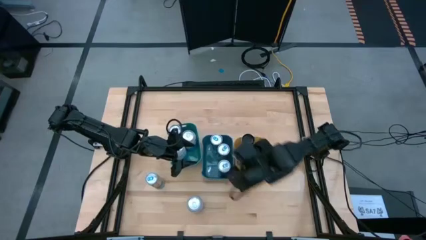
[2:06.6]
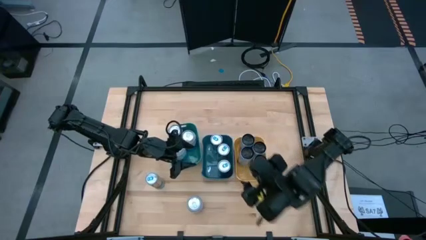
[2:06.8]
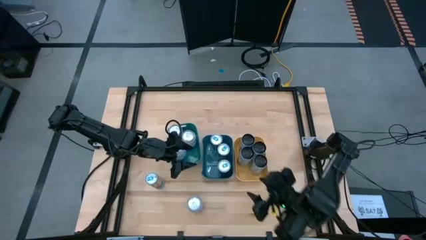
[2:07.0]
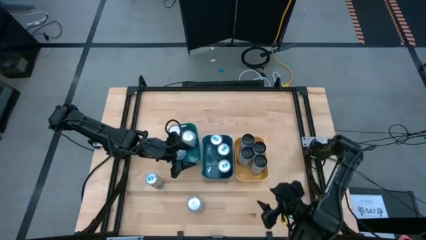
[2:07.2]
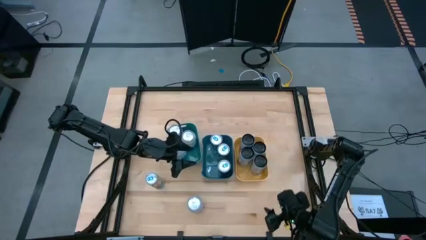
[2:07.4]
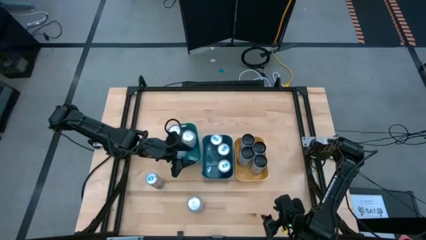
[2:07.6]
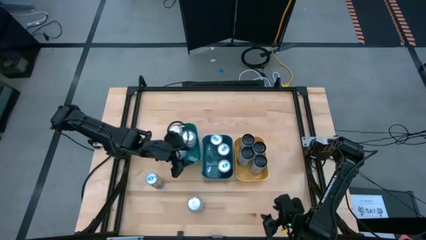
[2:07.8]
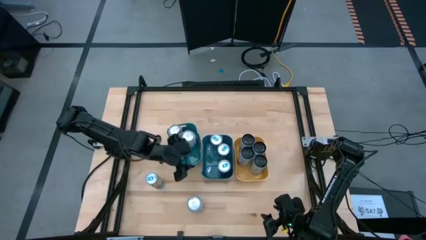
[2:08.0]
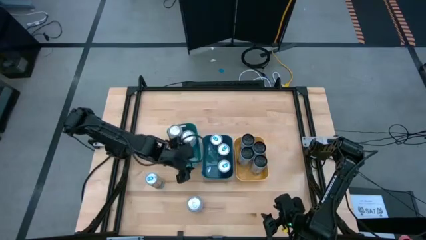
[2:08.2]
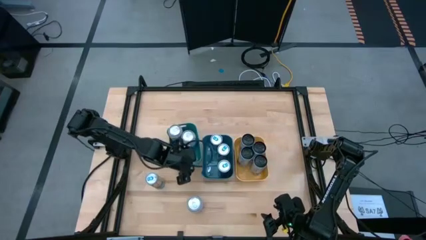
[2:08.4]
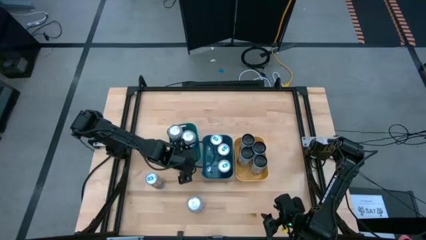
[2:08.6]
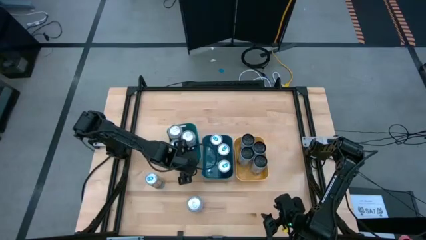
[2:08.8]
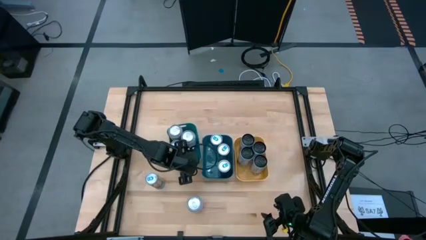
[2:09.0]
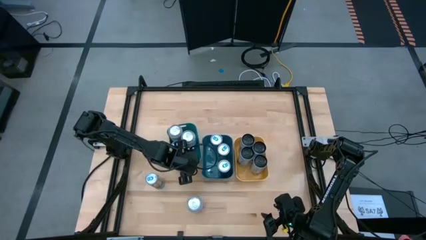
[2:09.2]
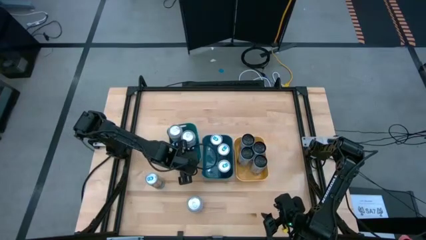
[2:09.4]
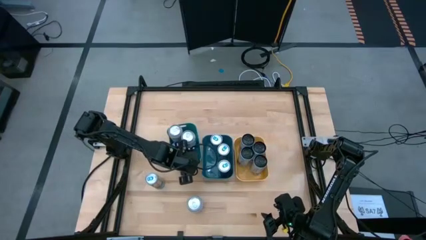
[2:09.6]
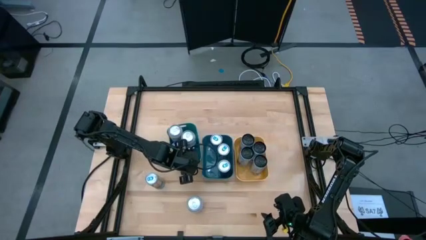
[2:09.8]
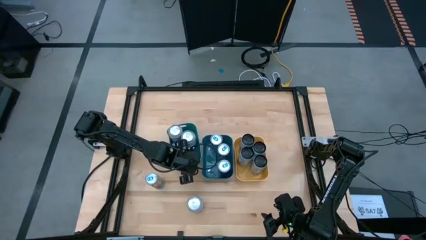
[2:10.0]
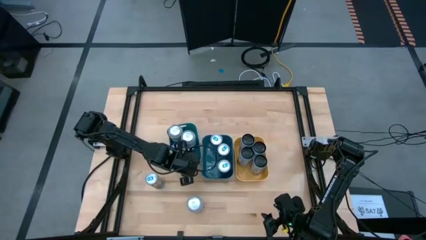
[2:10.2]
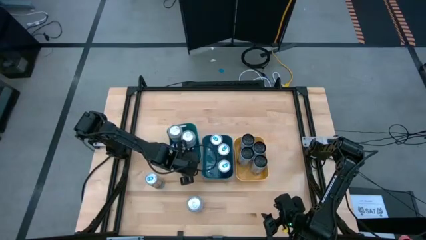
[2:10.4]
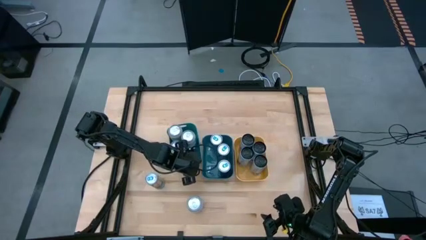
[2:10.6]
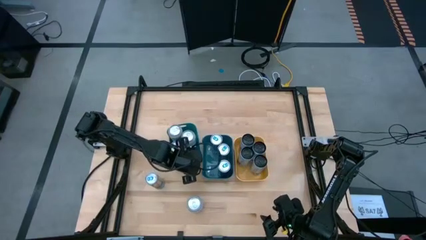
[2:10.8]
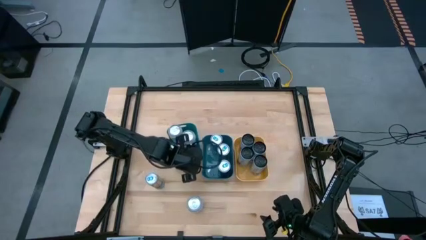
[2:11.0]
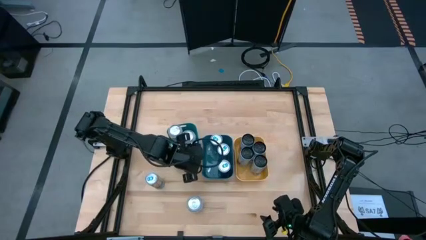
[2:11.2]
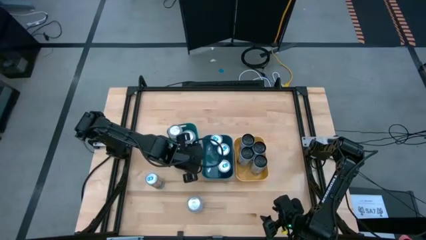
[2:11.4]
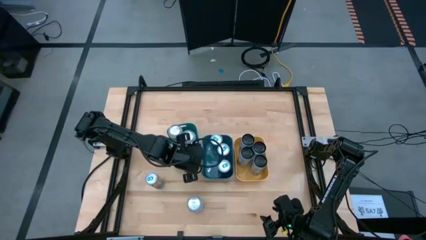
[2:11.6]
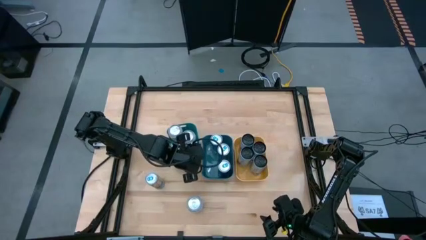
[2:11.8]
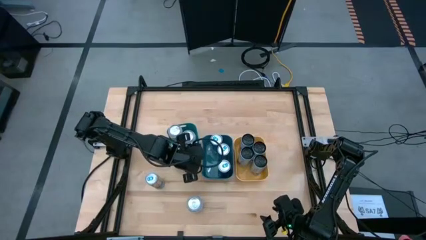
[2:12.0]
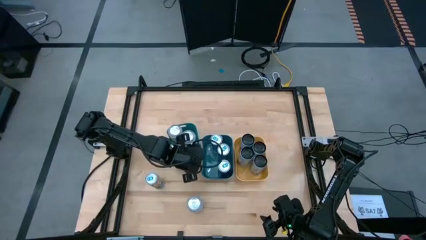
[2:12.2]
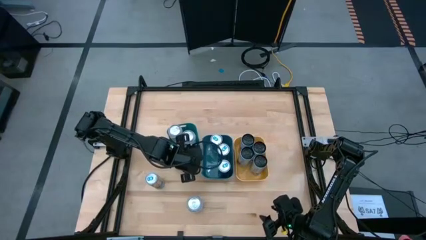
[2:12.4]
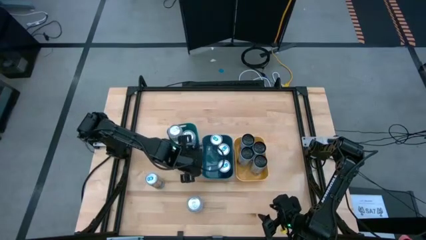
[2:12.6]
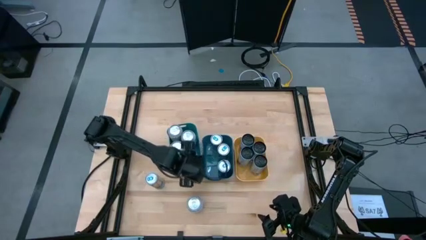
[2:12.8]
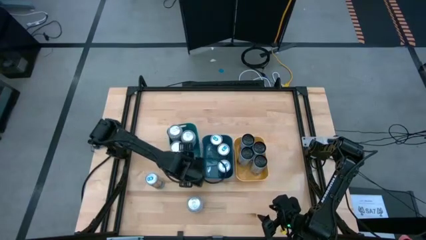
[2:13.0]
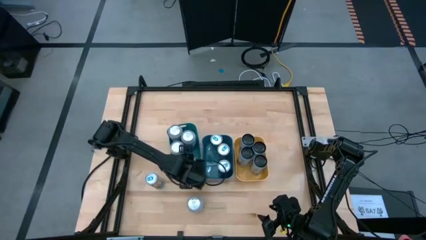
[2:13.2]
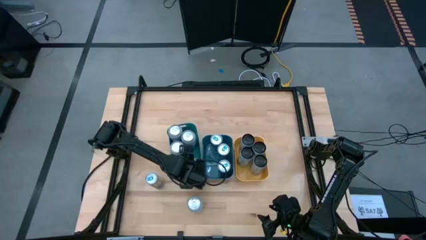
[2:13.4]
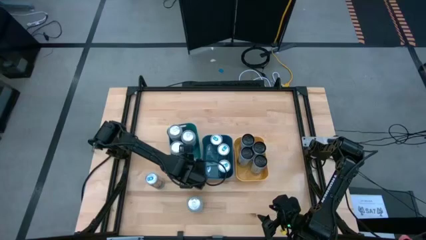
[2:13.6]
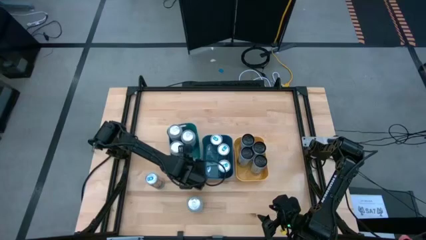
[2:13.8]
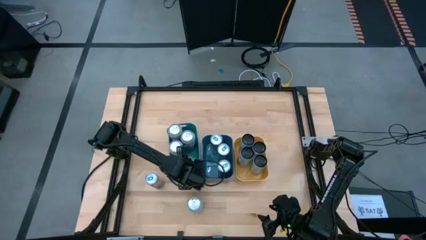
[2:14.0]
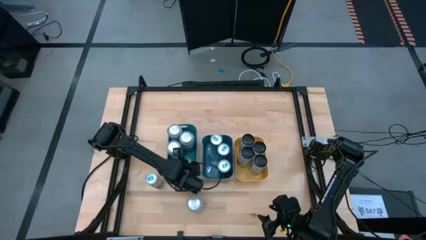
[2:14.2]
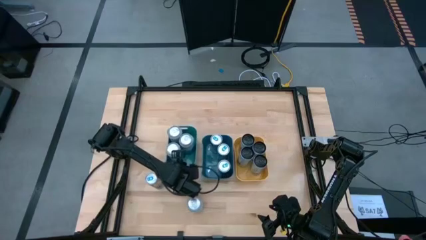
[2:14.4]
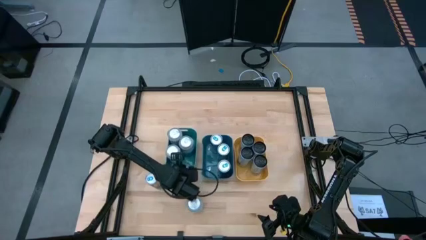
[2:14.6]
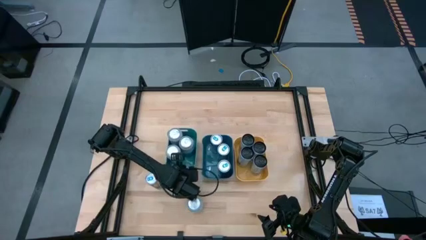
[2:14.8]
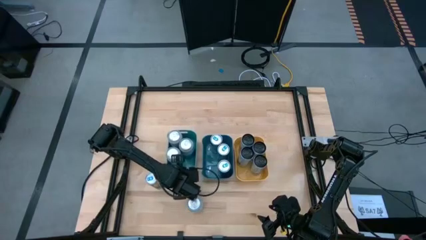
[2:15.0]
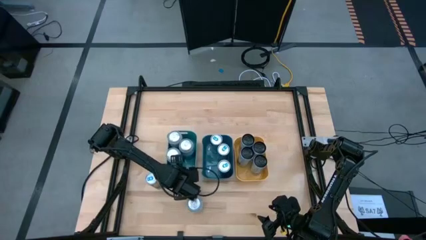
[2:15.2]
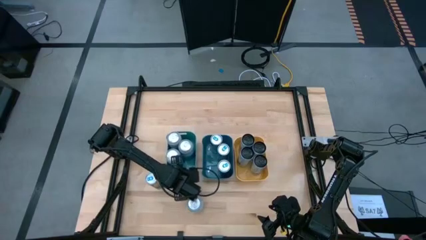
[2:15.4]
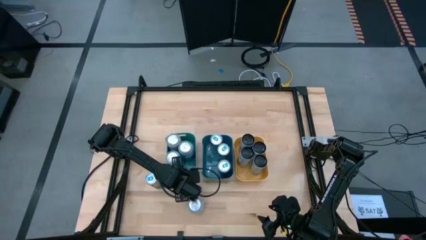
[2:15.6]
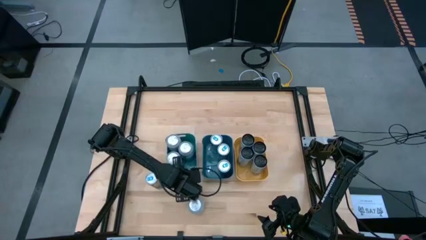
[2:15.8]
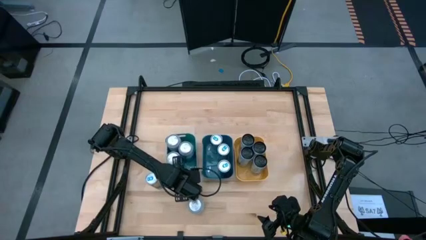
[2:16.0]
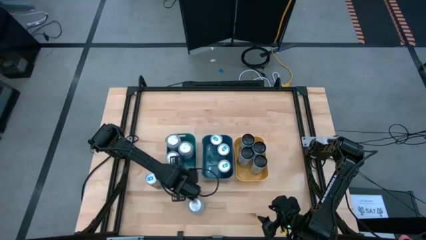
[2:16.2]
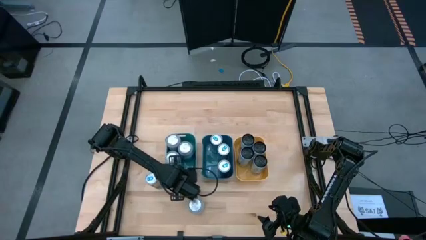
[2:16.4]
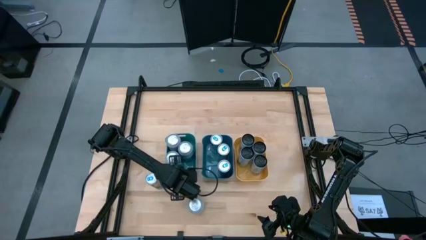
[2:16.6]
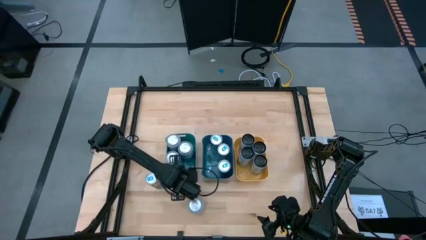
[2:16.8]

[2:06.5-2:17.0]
Task: Sort soda cans
Adjust the green bin

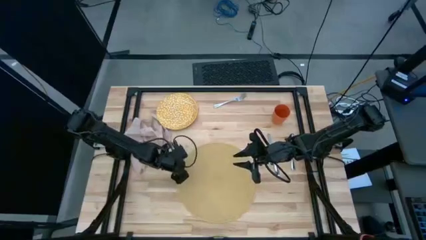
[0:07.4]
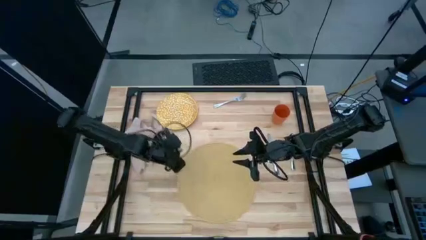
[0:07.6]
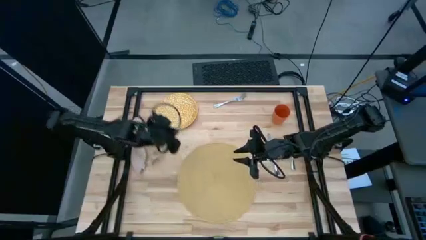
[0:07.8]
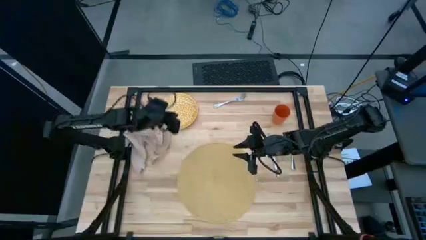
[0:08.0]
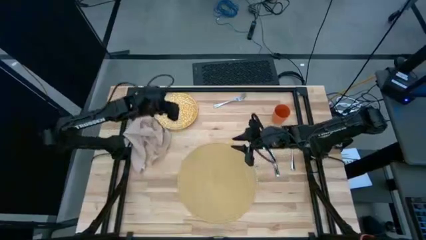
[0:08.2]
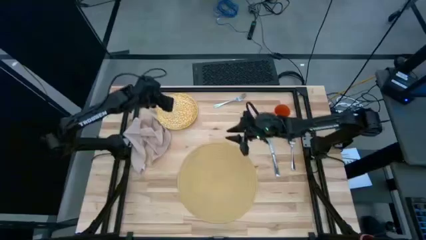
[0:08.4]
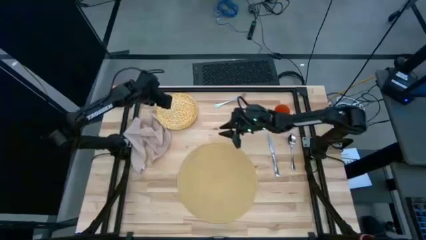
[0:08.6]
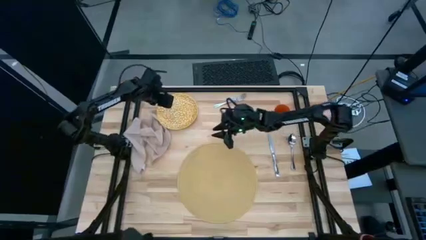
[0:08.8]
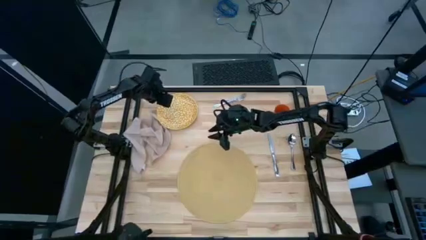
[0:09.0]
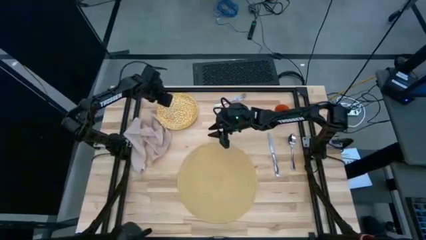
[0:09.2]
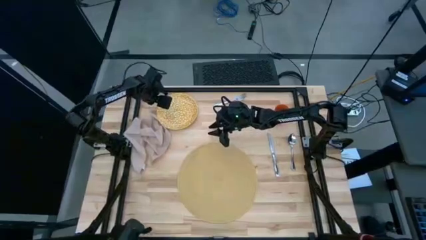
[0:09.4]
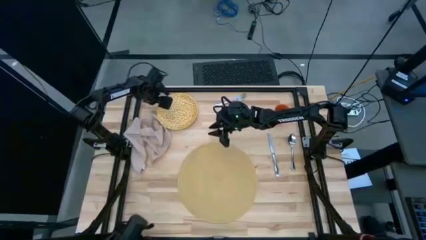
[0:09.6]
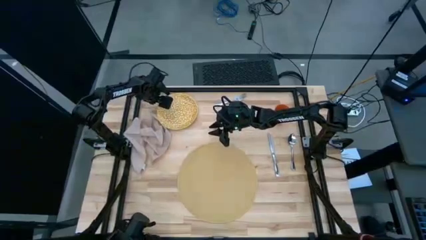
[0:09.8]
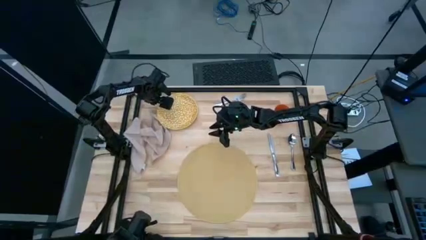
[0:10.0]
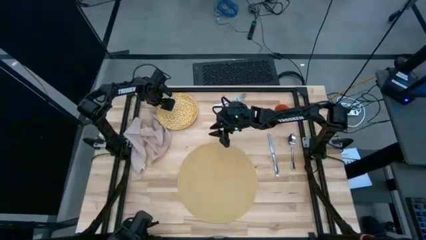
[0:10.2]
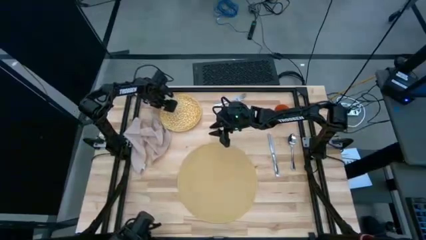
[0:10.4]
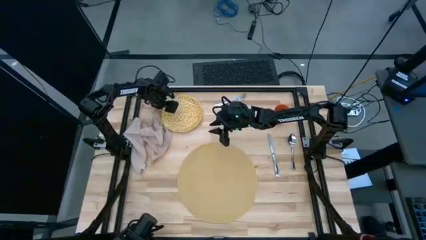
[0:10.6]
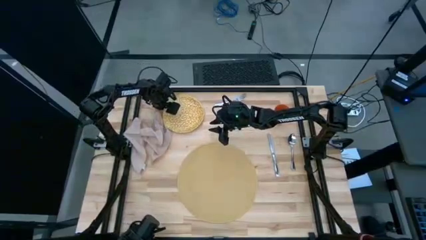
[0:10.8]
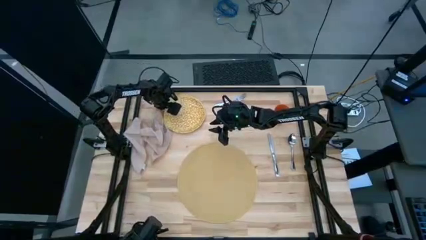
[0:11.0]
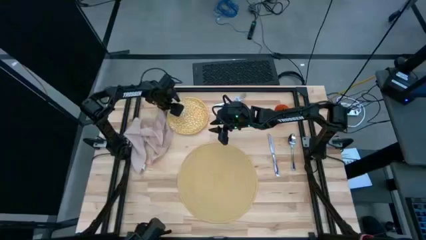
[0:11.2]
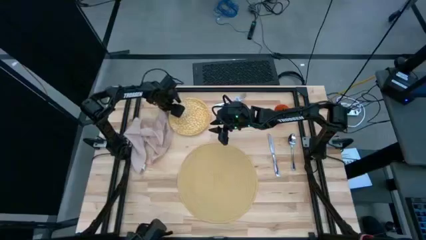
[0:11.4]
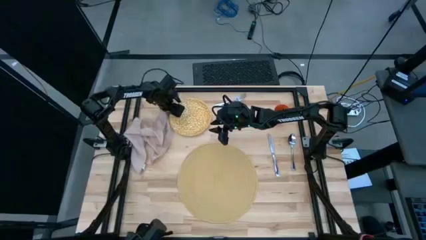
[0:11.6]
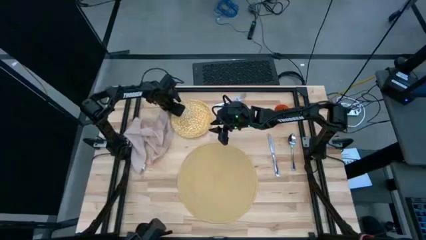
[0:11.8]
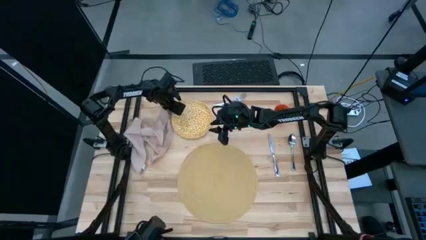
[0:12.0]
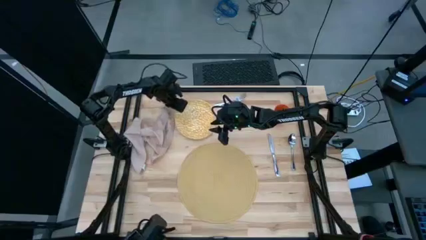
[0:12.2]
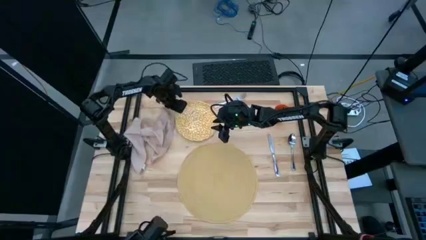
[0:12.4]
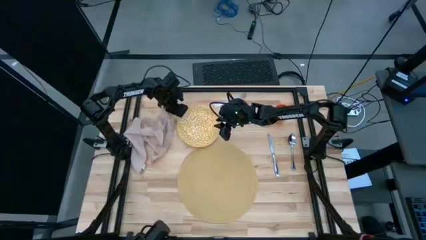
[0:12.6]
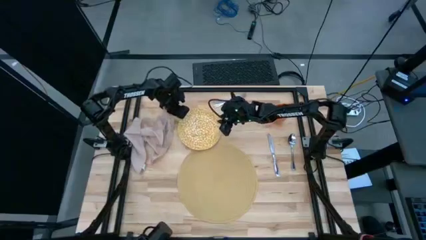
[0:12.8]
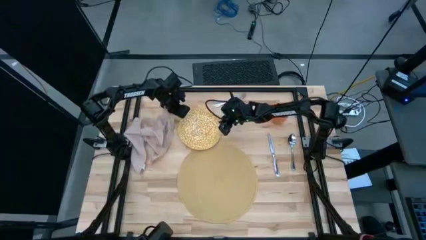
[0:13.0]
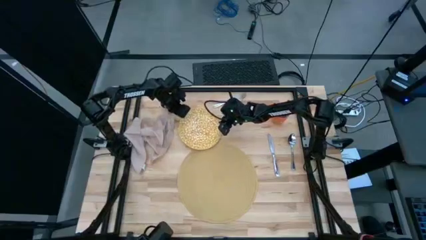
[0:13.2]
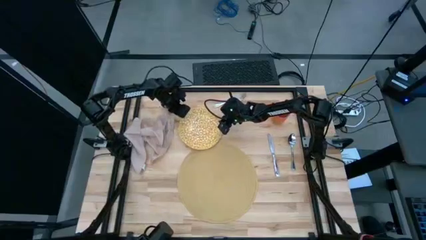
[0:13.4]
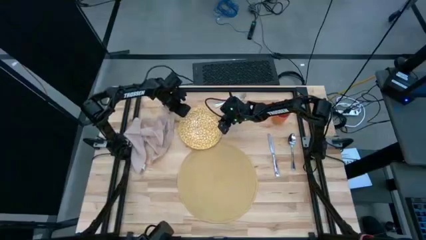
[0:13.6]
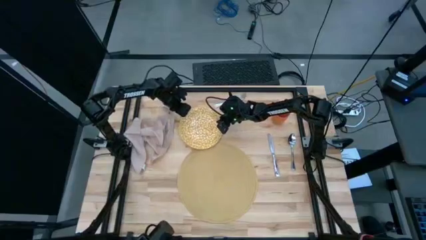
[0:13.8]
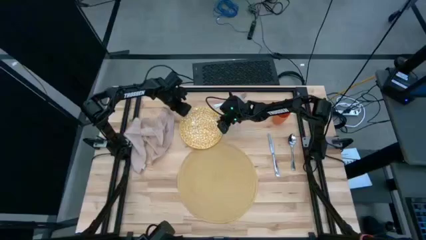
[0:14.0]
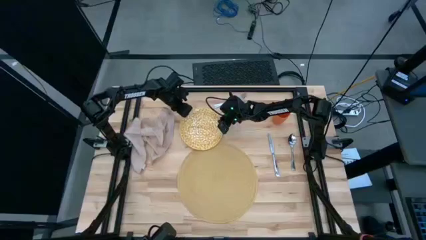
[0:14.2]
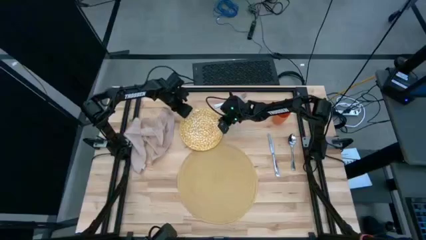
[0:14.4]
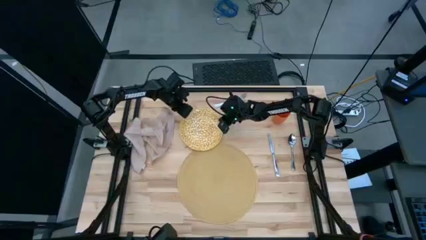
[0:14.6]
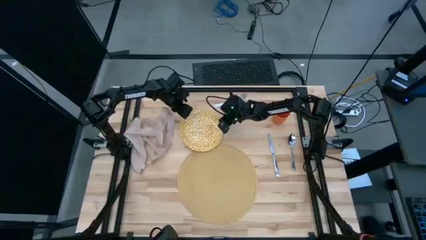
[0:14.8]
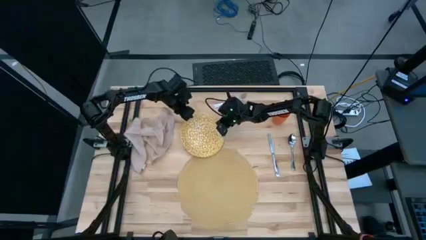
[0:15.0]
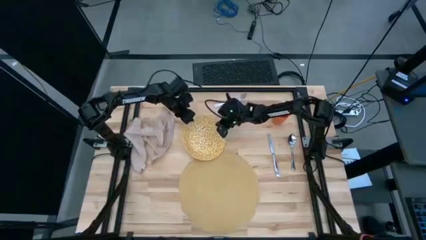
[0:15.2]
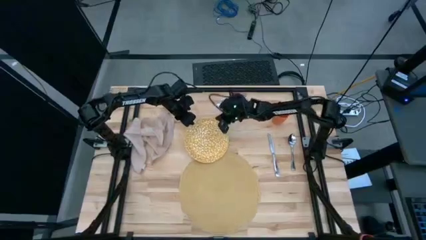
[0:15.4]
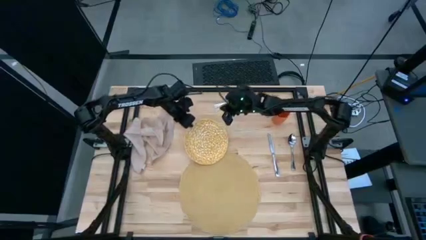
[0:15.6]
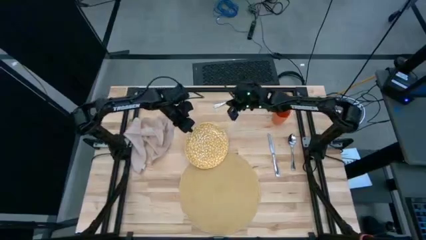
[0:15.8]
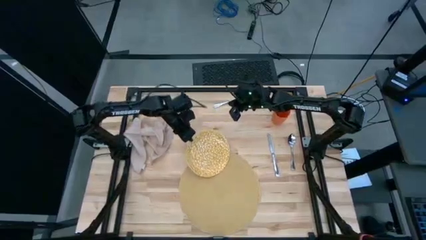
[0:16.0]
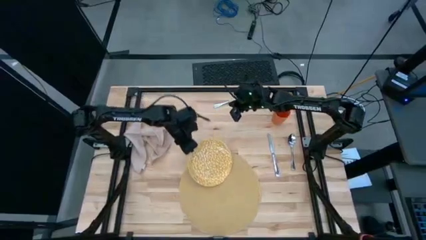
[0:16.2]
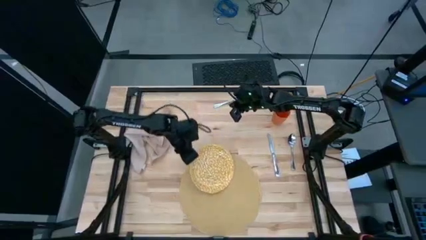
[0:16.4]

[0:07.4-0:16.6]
Task: Set table place
Put the yellow plate on the brown table mat
